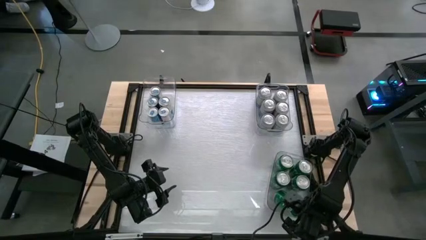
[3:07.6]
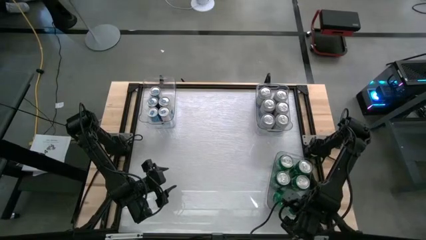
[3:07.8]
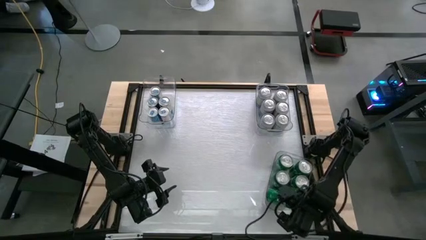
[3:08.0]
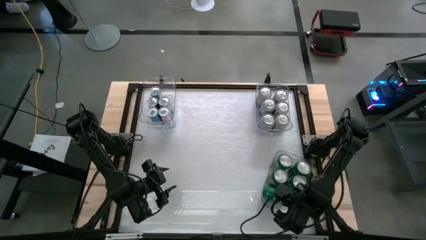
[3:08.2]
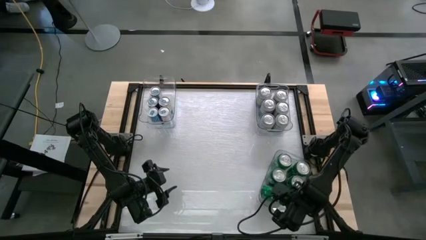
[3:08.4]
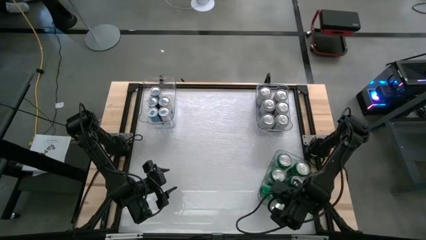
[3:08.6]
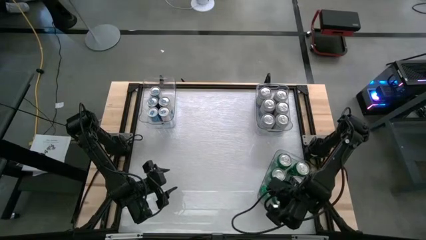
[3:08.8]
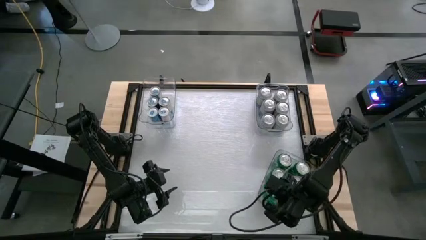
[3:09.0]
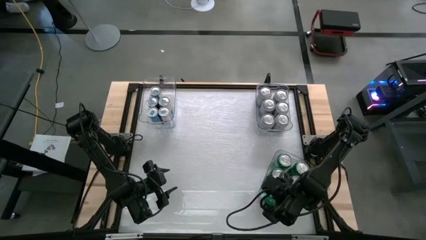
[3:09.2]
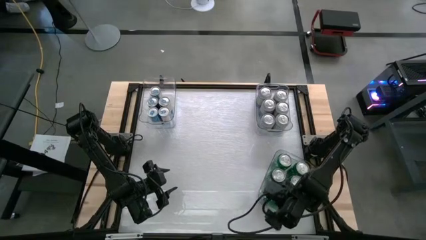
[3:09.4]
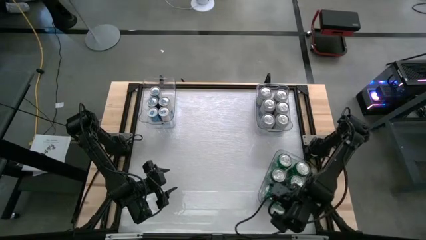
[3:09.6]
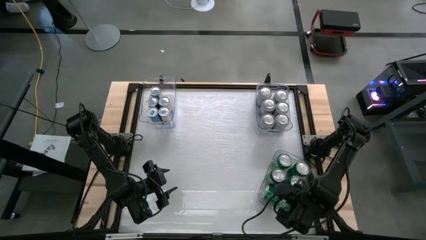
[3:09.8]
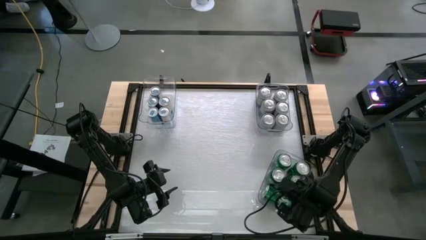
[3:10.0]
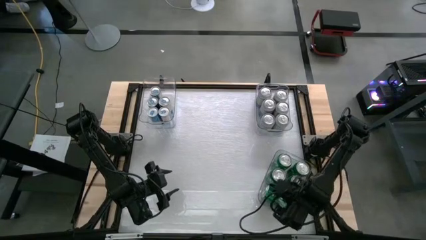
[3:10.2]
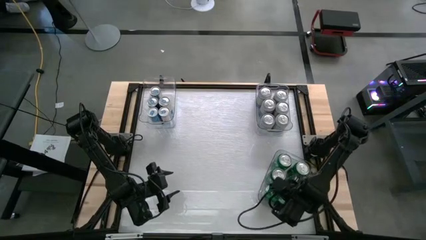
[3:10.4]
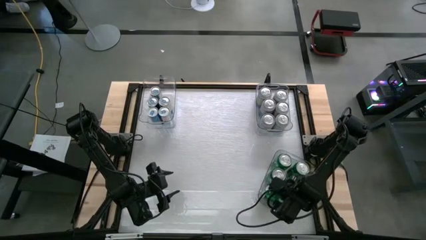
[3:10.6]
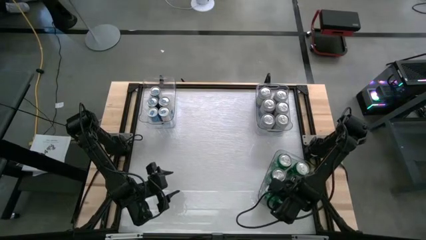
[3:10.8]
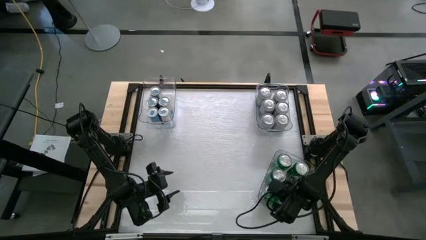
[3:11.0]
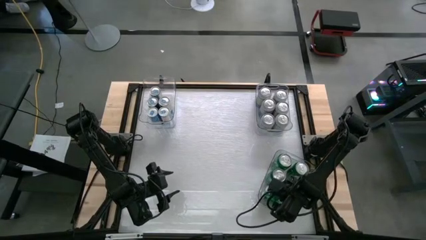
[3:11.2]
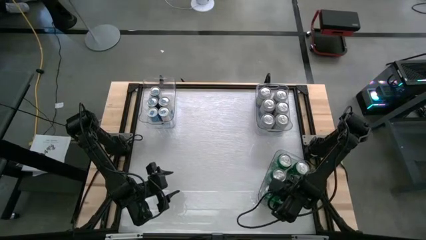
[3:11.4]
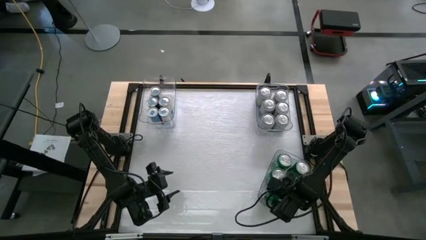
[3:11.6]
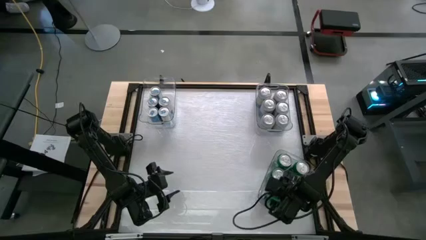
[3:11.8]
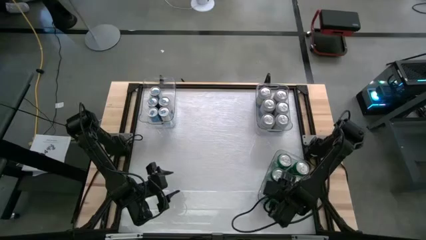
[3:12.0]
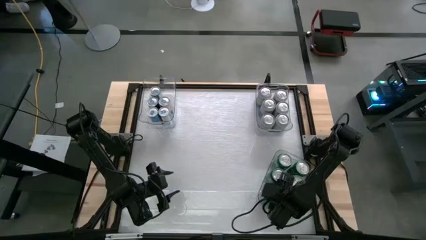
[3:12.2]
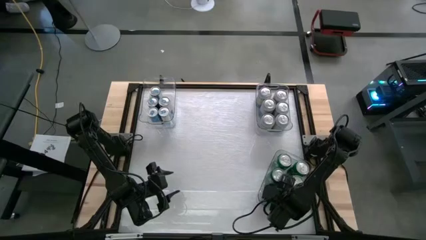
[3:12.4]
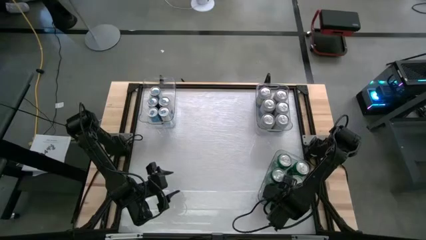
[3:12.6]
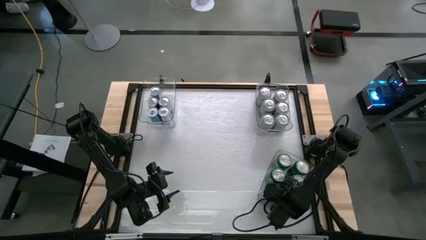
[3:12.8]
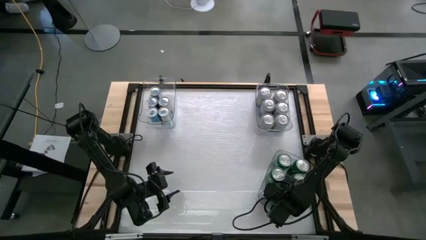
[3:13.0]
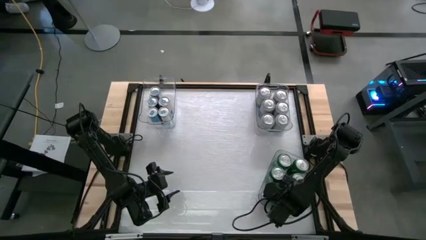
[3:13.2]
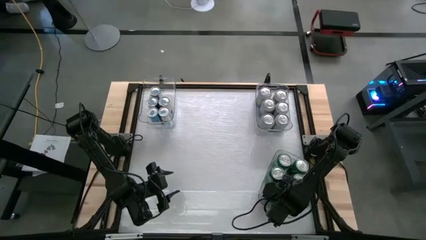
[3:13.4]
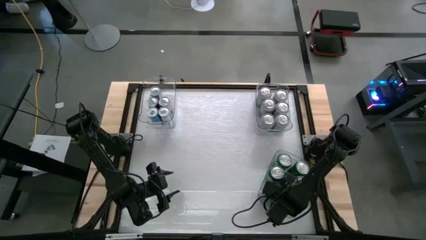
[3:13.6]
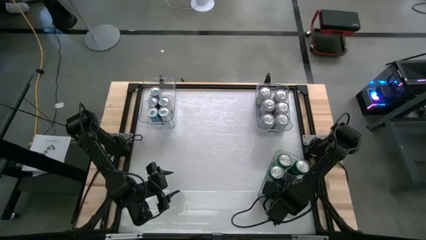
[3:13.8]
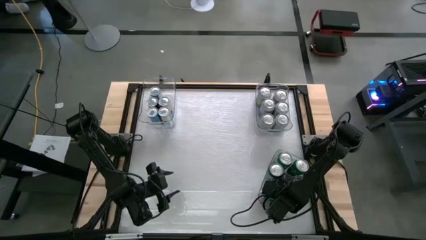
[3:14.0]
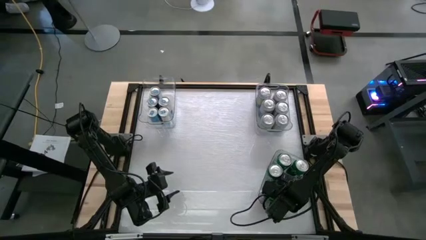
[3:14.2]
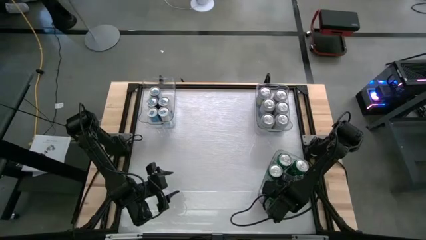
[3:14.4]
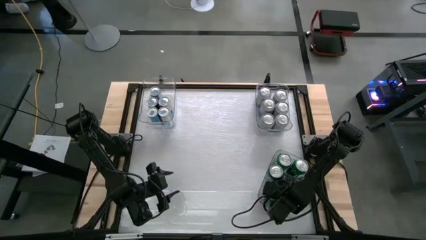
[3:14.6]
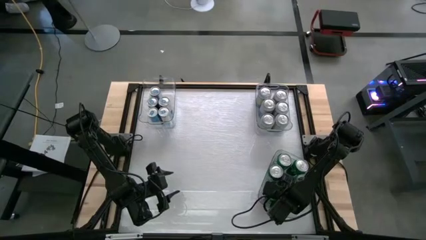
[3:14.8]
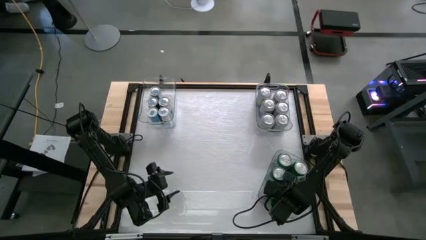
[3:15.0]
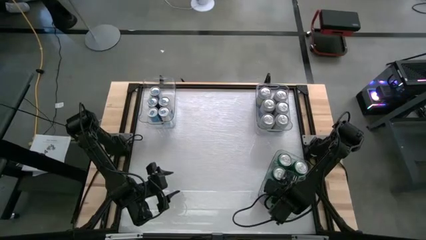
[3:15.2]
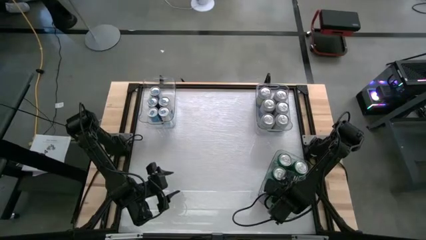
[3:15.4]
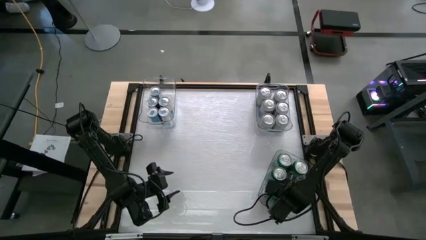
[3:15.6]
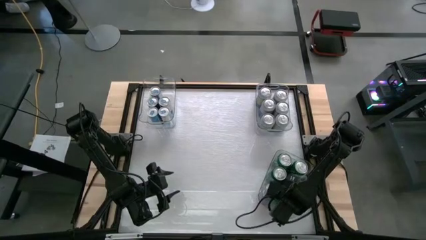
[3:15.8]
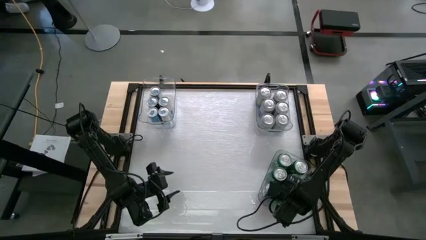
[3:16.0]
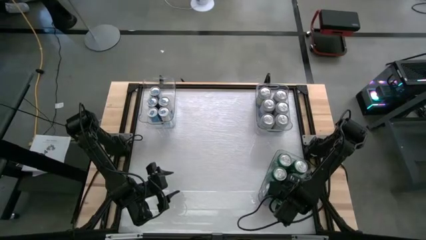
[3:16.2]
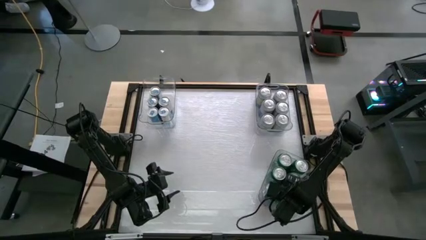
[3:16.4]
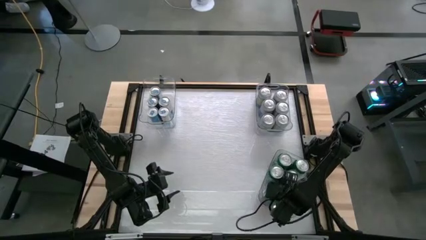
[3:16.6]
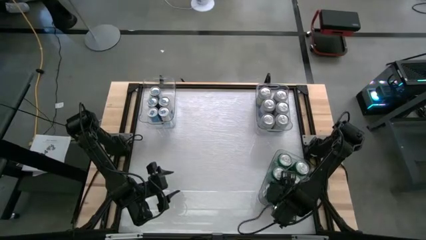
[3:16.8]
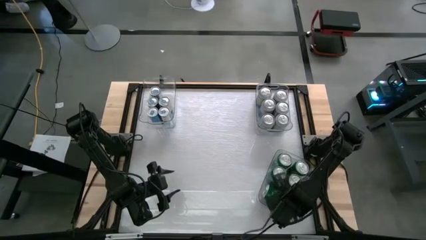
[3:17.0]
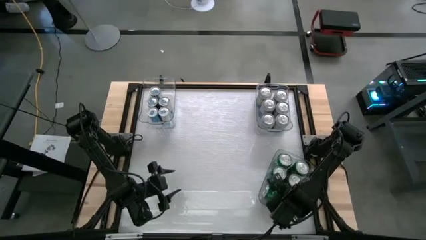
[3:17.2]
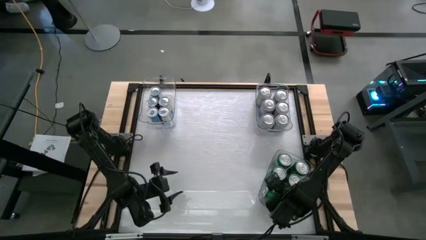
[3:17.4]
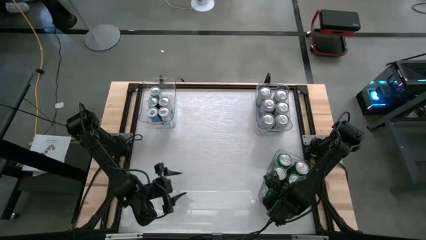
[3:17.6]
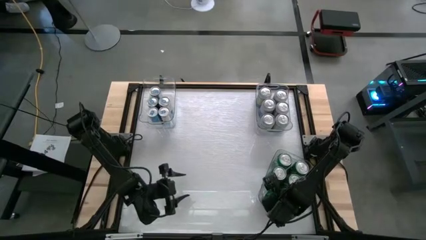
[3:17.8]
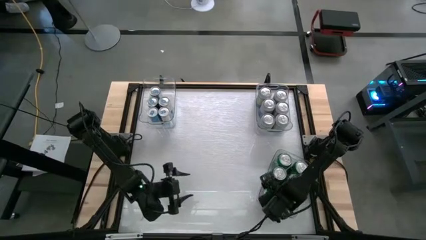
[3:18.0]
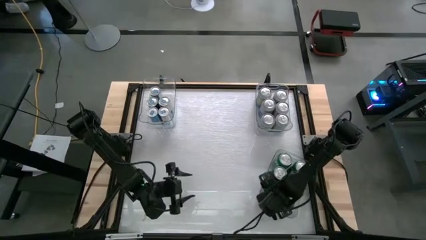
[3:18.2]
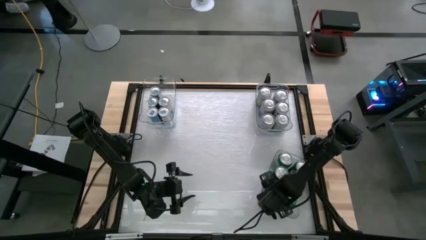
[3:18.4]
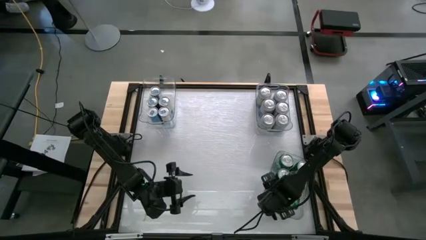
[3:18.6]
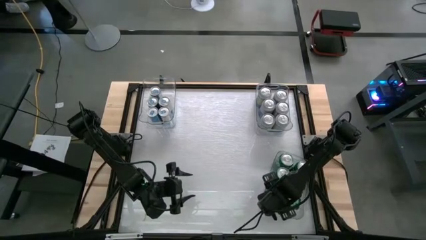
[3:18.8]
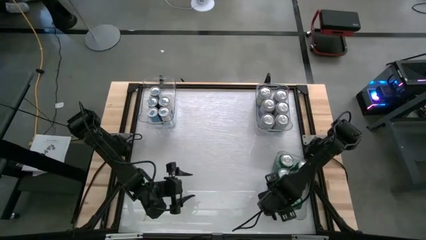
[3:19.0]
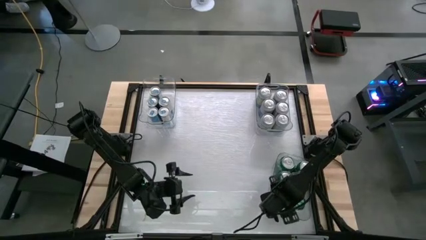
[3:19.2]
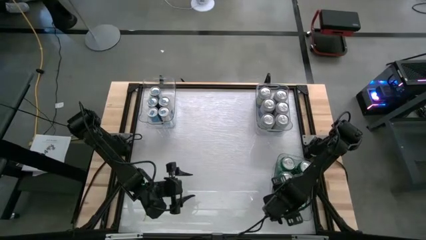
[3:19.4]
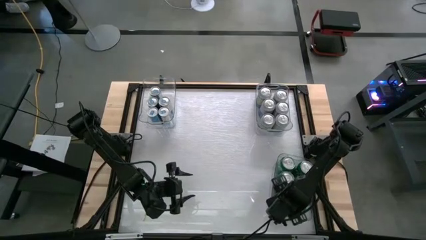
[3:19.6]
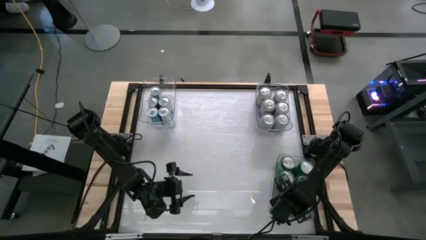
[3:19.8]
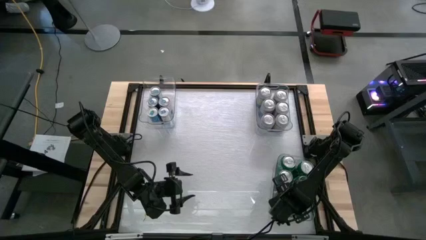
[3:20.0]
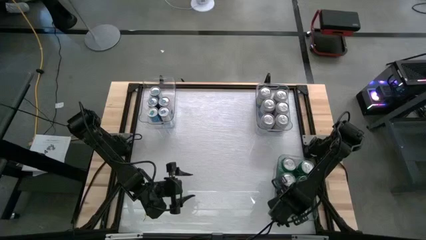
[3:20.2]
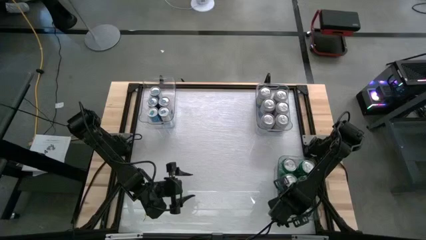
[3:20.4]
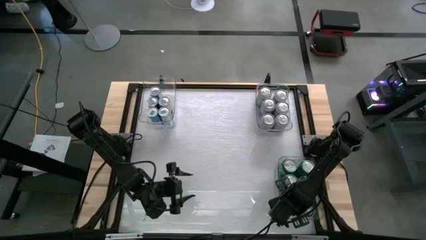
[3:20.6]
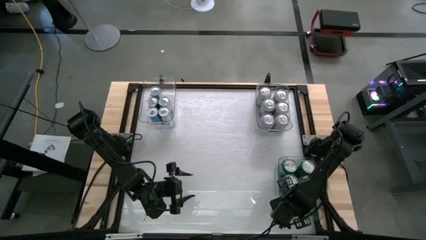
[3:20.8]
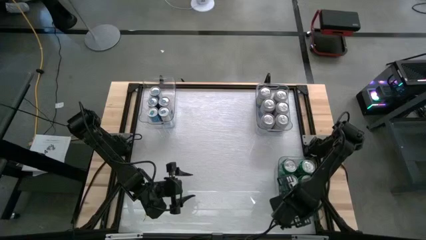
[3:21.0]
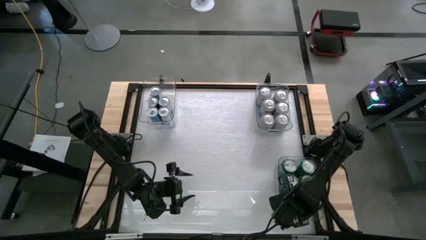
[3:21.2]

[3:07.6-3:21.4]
Task: Sort soda cans
Put the green soda can into the bottom transparent bin

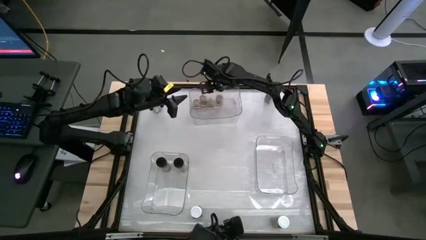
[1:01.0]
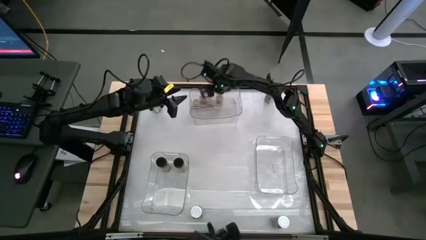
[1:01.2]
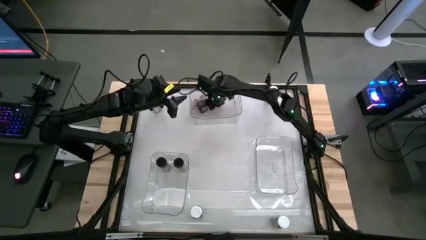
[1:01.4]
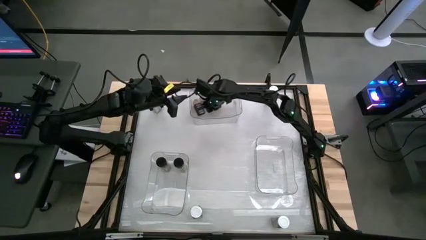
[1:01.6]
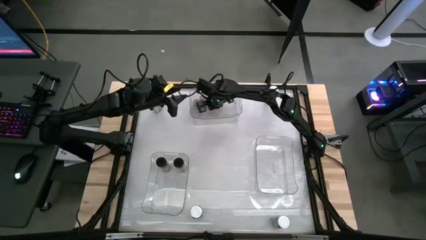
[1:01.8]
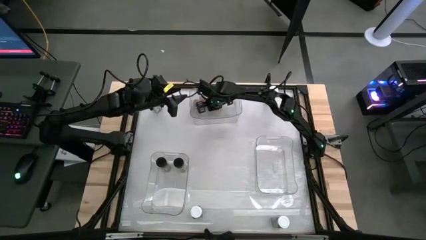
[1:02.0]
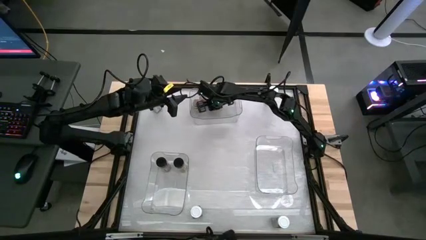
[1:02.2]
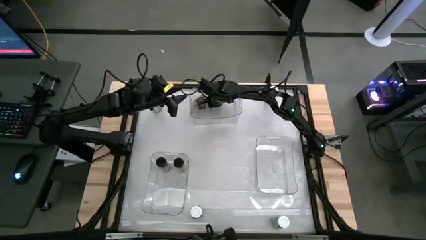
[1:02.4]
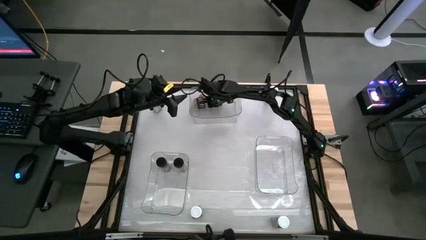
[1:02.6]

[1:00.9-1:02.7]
Task: Sort spices by type
Adjust the brown seasoning bottle in the middle transparent bin

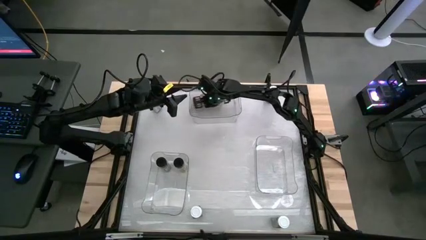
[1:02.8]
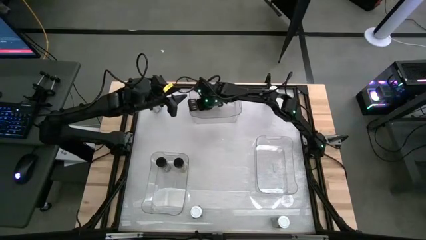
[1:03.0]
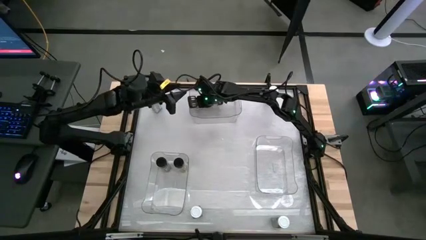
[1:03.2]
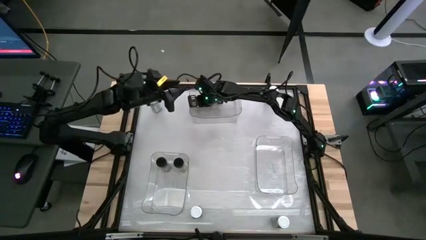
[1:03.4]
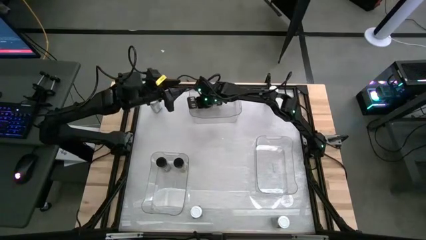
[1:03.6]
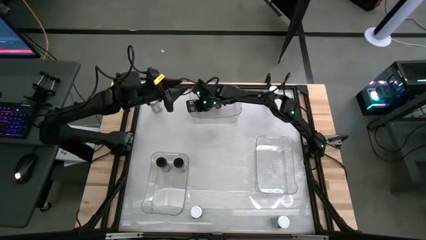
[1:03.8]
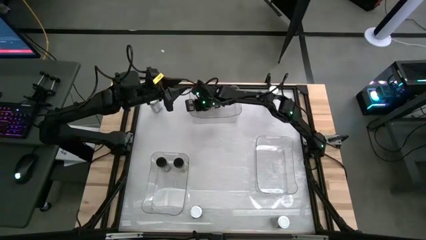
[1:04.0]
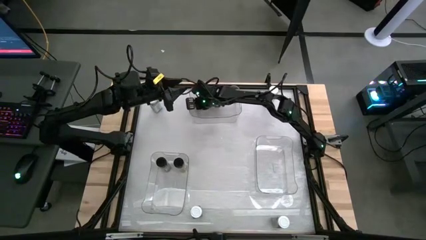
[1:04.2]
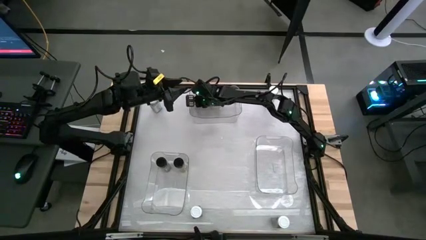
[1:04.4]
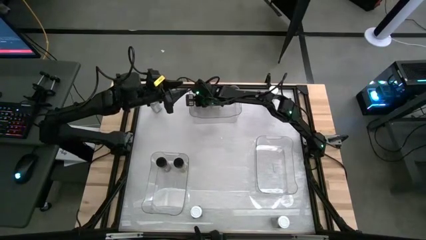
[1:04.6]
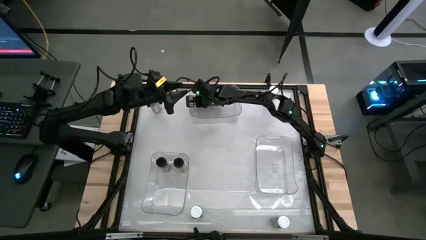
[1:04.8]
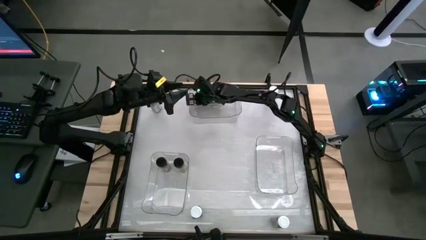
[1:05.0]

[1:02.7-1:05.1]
Adjust the brown seasoning bottle in the middle transparent bin
